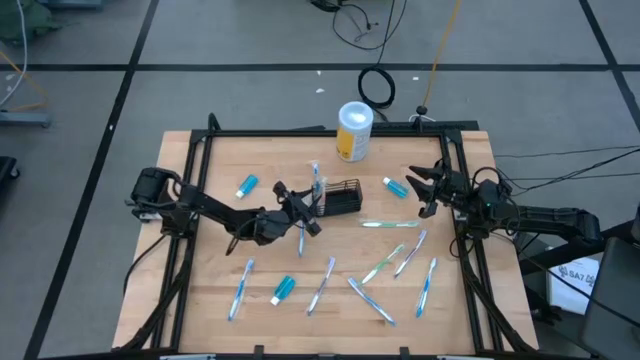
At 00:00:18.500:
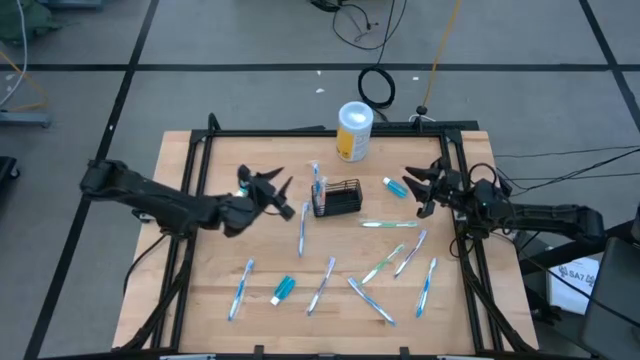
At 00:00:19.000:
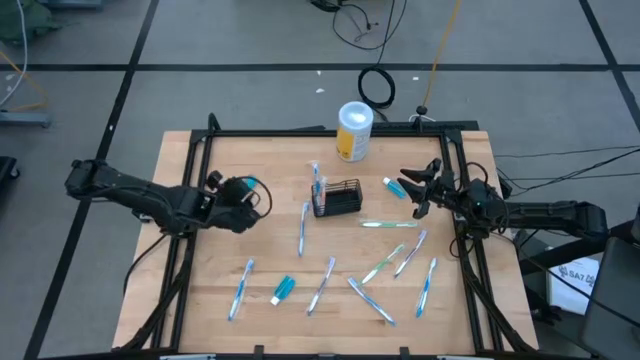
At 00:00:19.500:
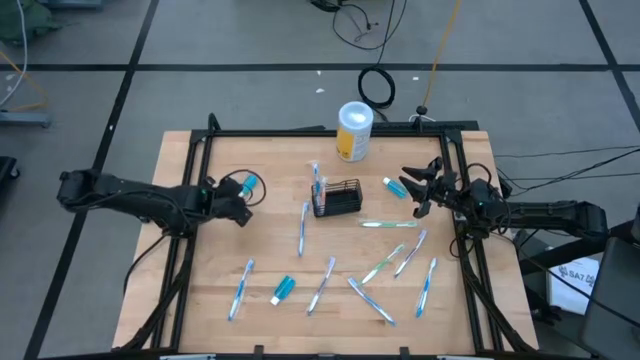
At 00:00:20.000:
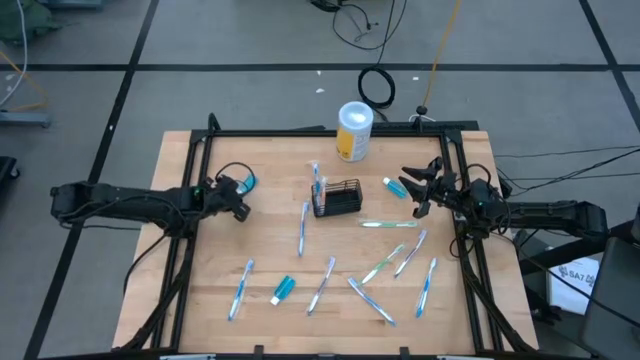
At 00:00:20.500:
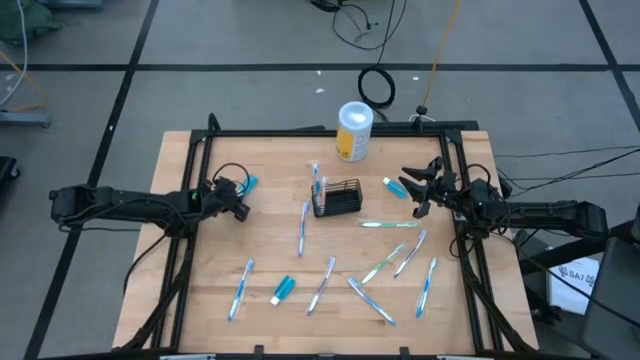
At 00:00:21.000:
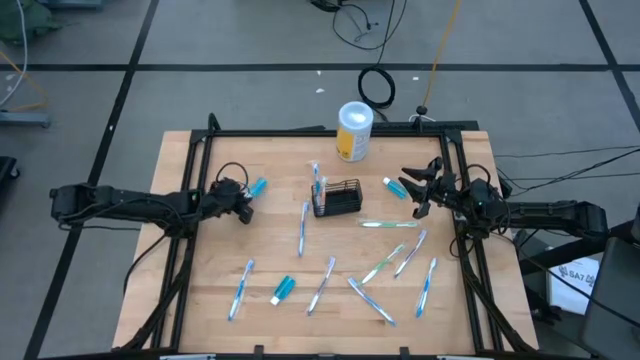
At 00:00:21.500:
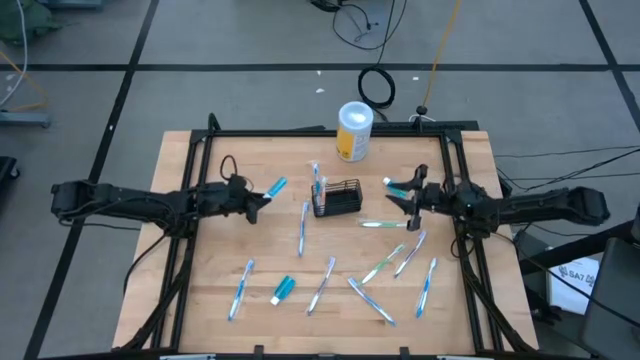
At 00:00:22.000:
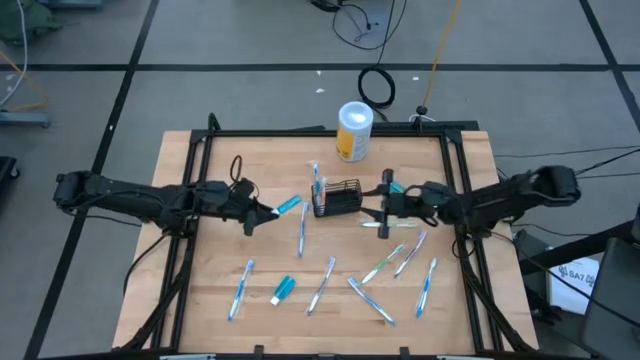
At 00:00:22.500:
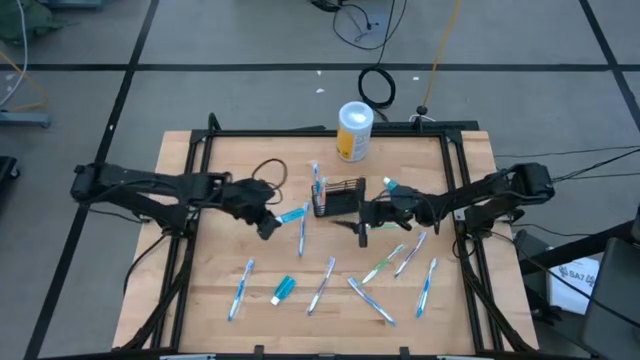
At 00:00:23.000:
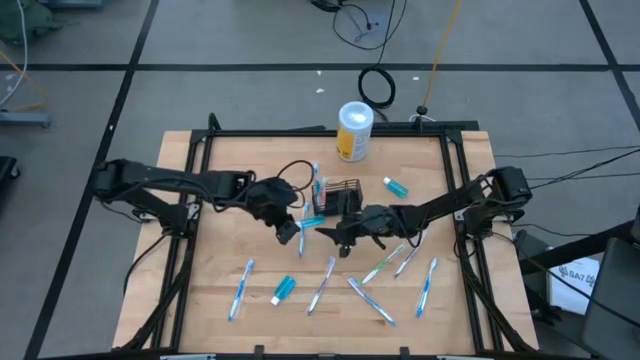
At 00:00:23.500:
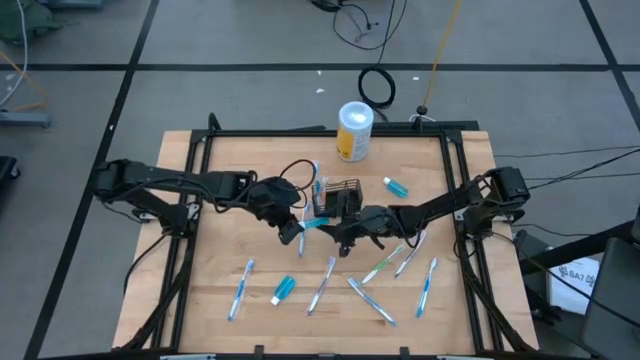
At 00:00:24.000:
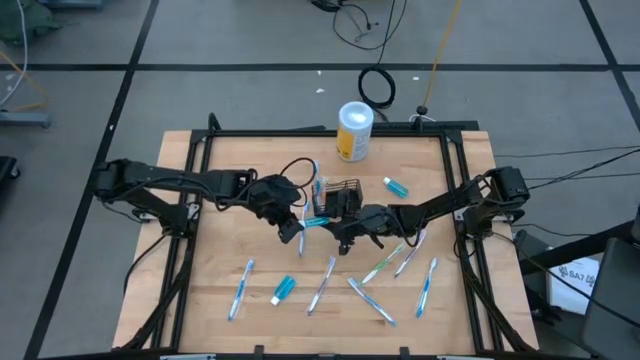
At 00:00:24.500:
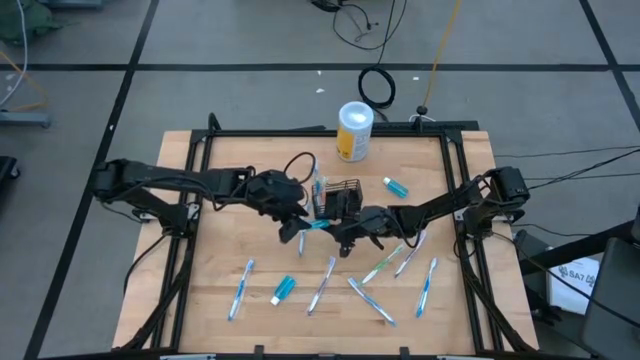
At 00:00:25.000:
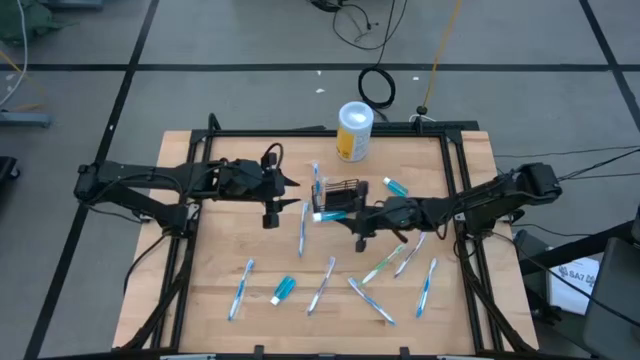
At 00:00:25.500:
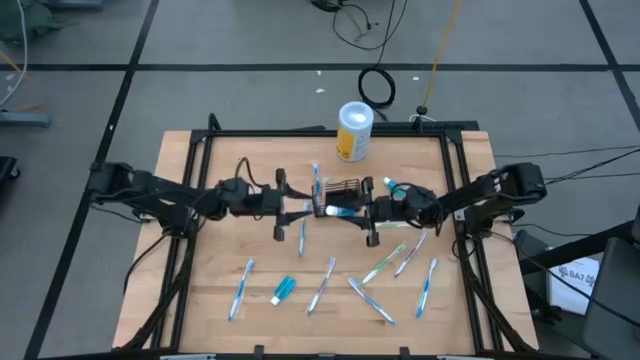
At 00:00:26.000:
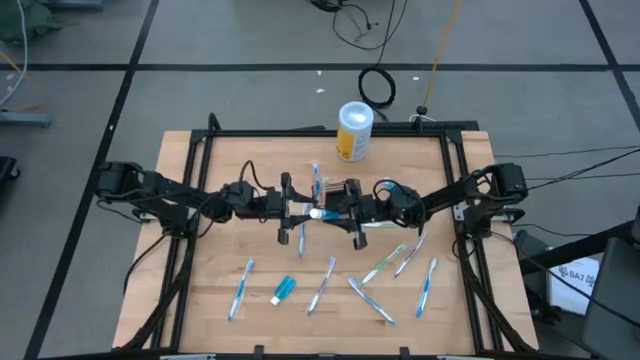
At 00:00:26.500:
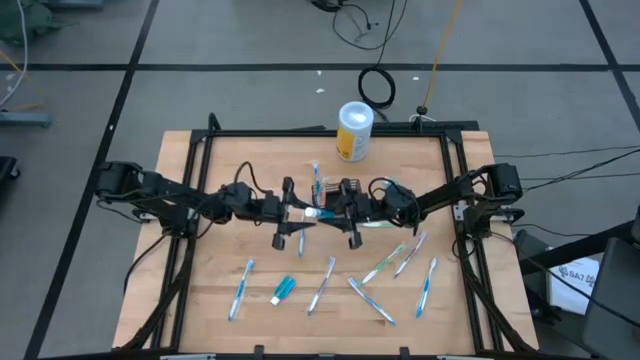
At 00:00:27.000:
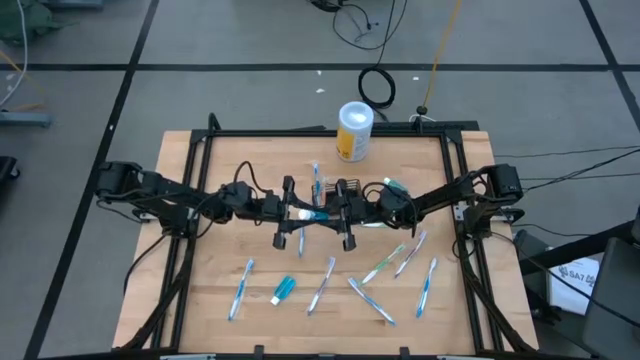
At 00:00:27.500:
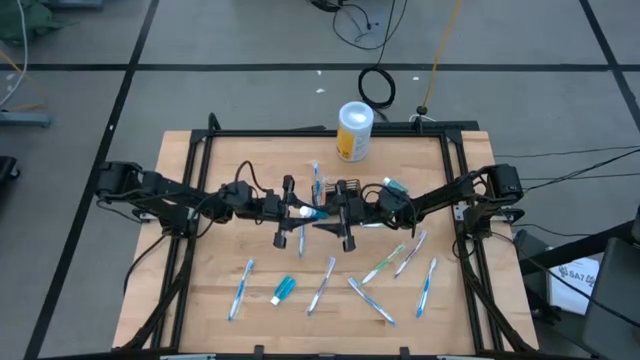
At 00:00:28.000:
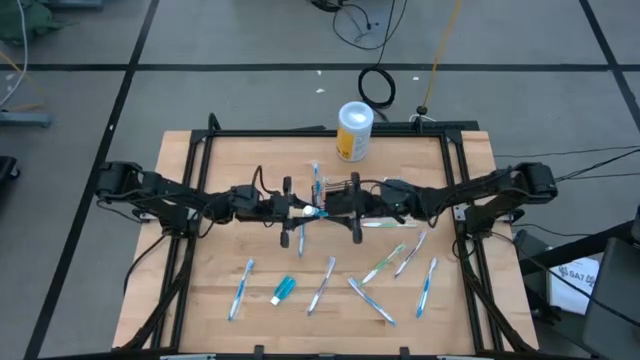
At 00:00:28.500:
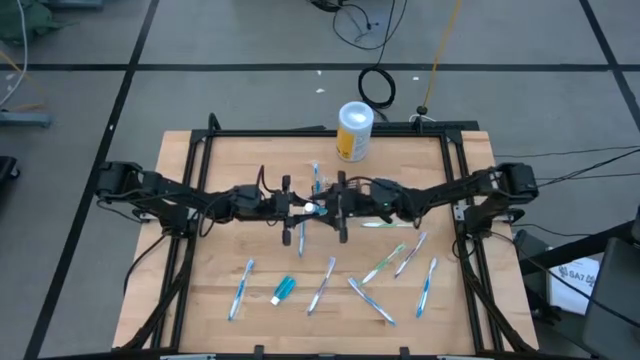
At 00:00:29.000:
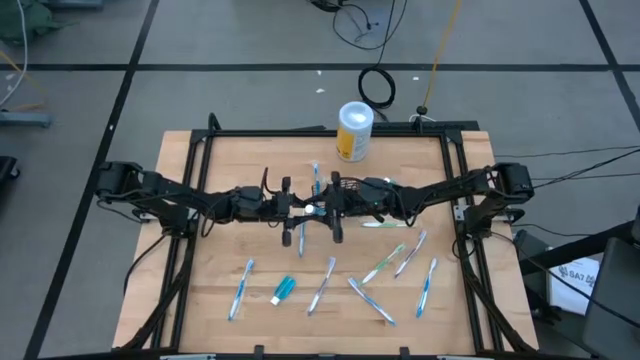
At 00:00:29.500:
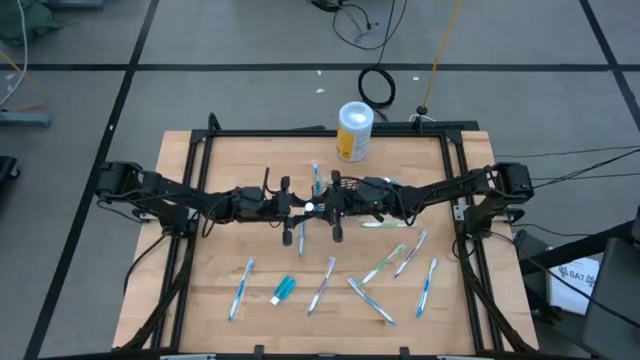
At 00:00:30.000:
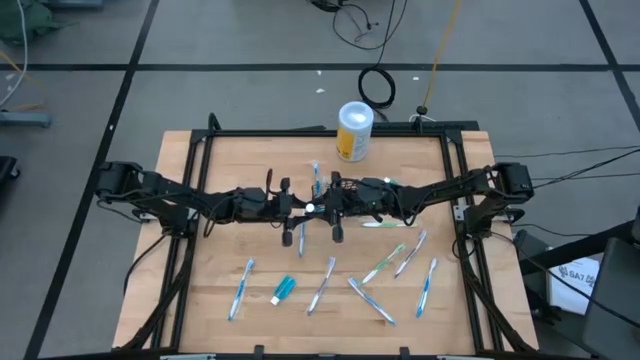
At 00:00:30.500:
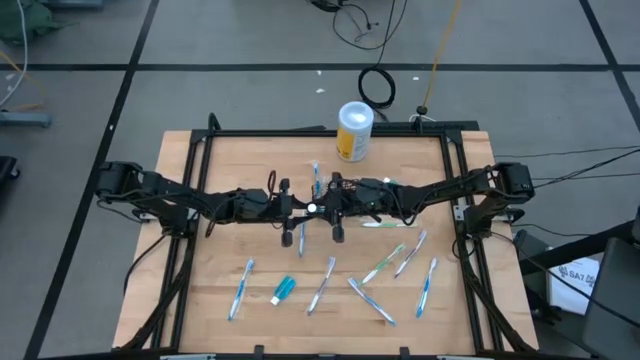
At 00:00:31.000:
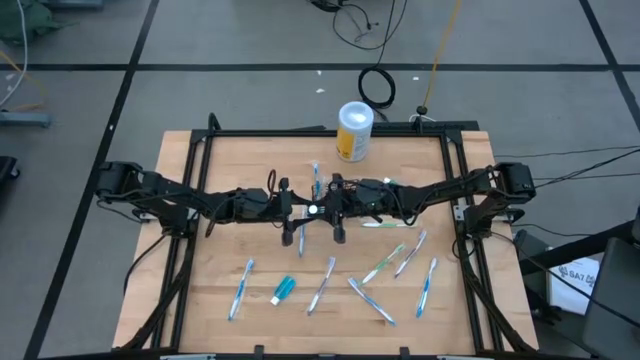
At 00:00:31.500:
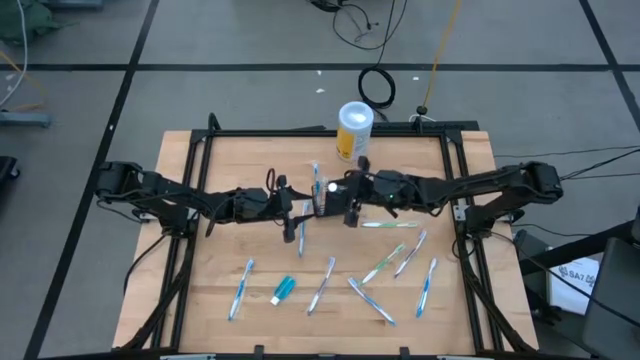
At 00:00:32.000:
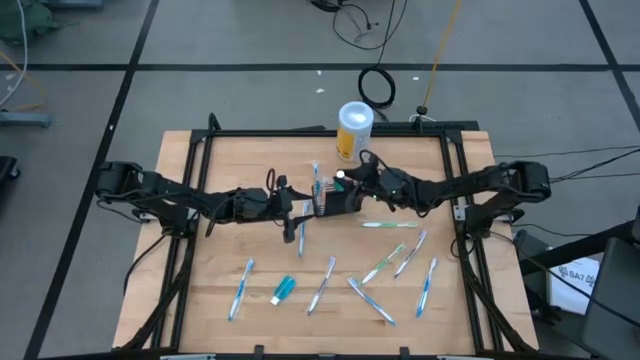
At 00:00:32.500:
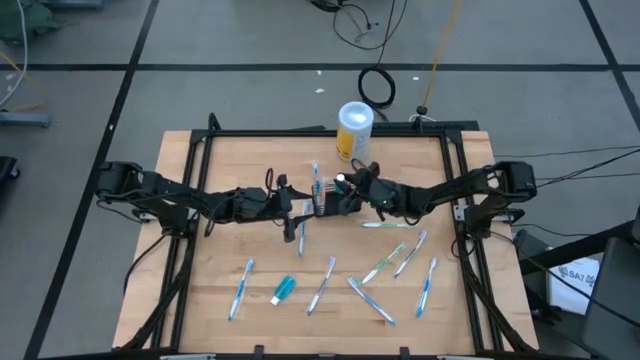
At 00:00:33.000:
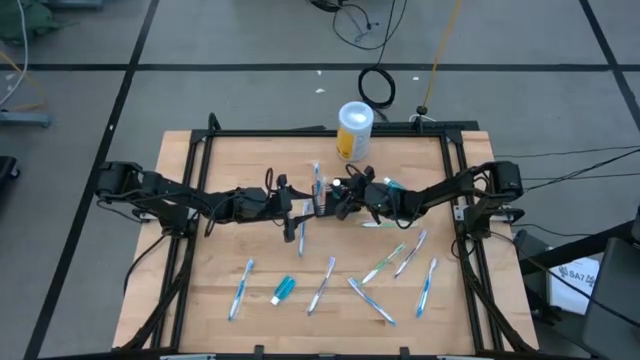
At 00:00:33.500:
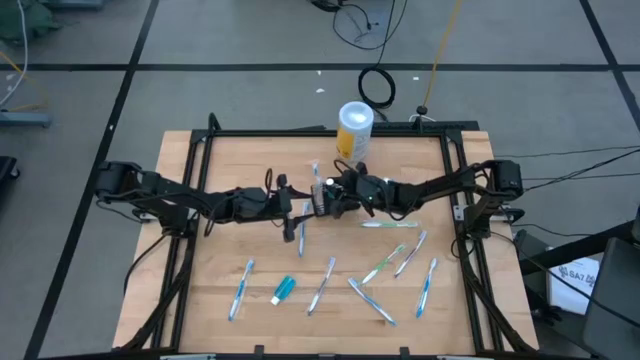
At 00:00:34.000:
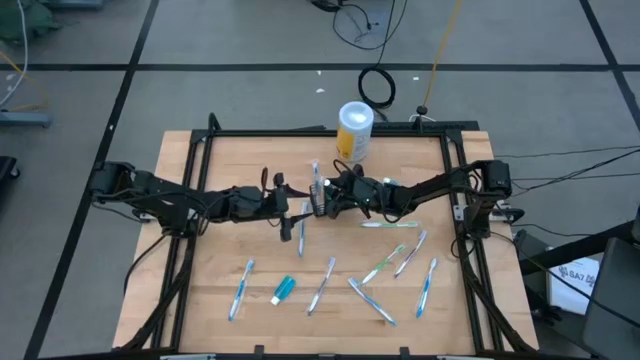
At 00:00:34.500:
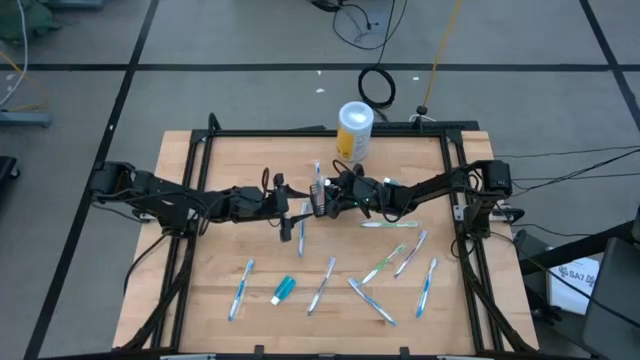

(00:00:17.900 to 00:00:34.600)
Task: Pick & Place toothbrushing station
Put the blue mouthwash into the black wire organizer
